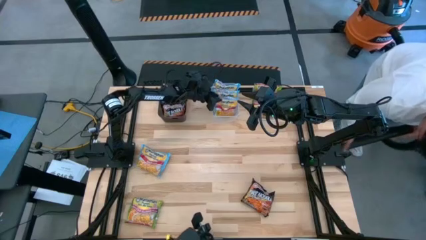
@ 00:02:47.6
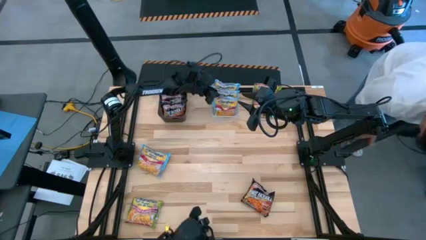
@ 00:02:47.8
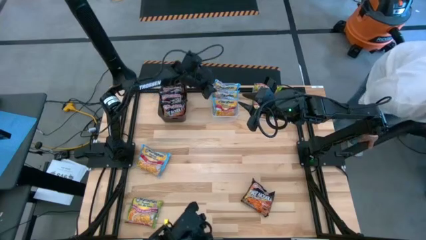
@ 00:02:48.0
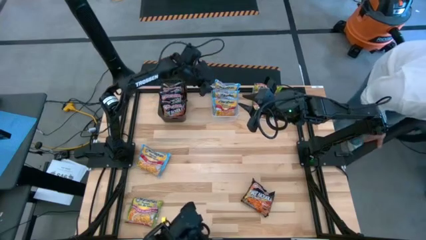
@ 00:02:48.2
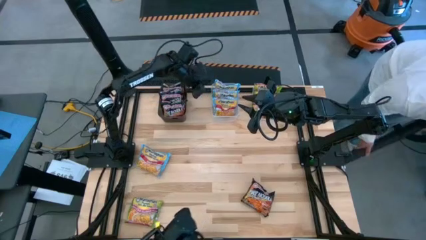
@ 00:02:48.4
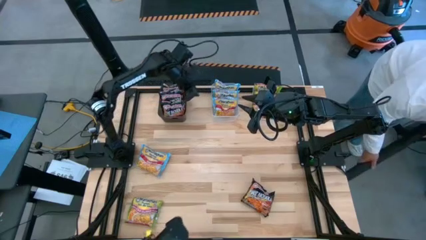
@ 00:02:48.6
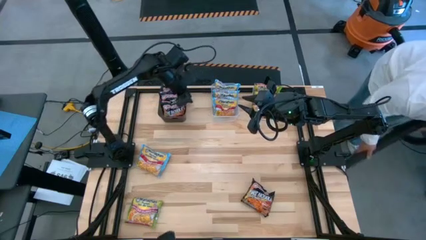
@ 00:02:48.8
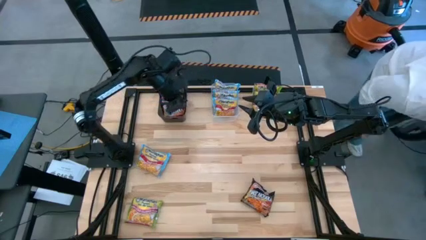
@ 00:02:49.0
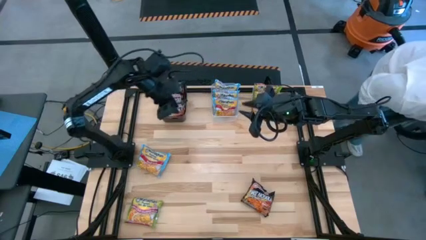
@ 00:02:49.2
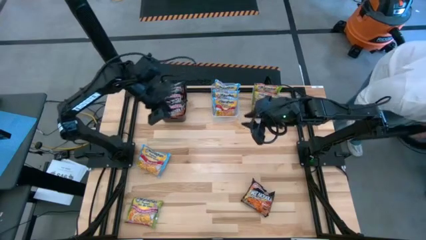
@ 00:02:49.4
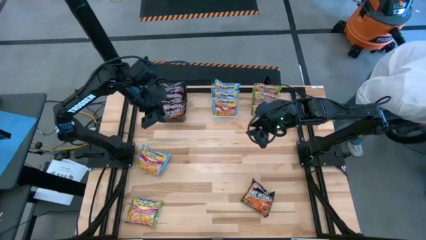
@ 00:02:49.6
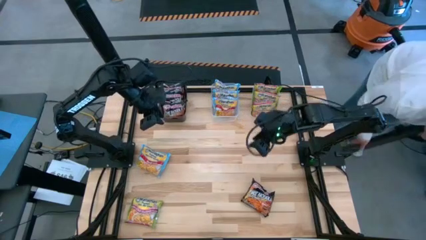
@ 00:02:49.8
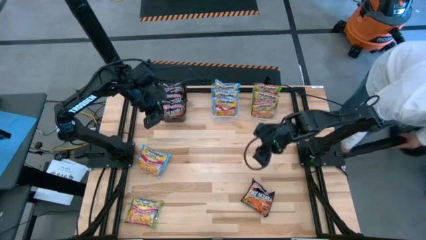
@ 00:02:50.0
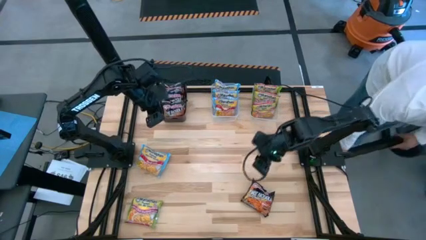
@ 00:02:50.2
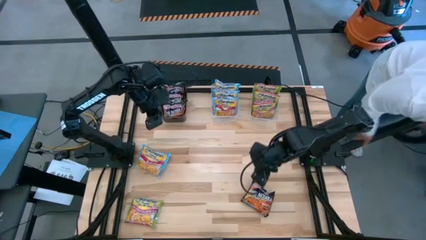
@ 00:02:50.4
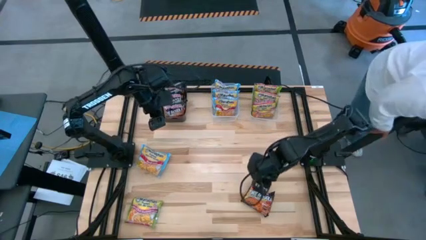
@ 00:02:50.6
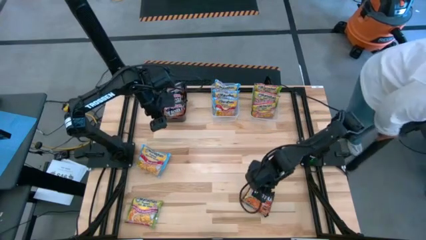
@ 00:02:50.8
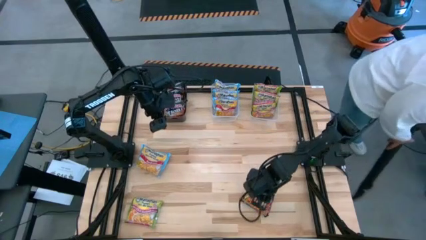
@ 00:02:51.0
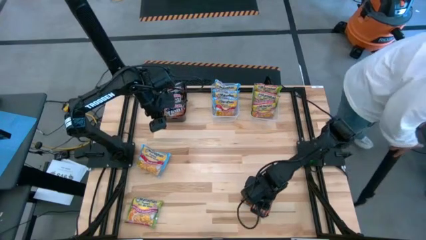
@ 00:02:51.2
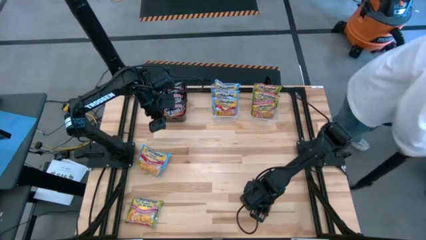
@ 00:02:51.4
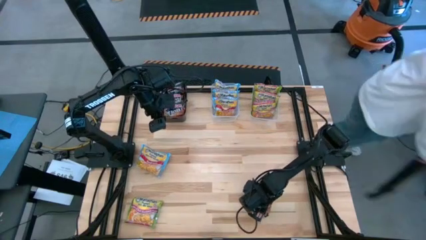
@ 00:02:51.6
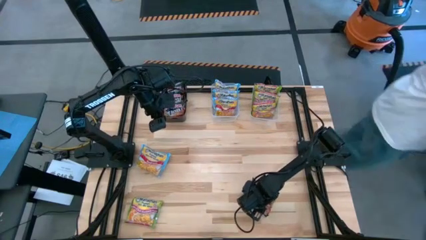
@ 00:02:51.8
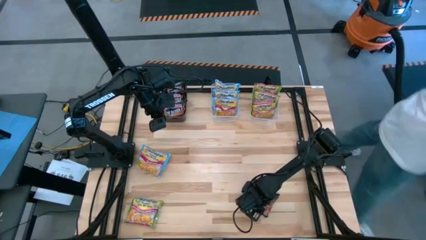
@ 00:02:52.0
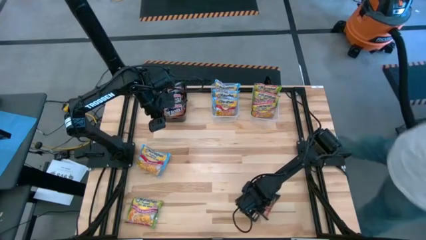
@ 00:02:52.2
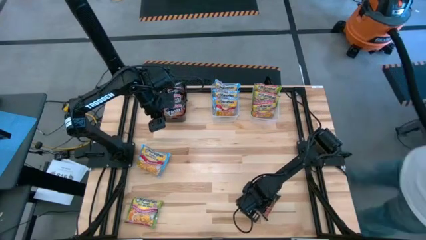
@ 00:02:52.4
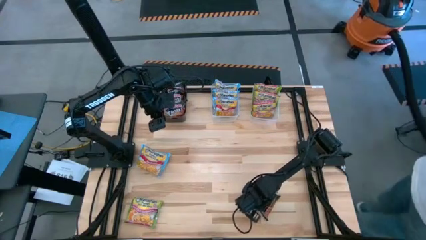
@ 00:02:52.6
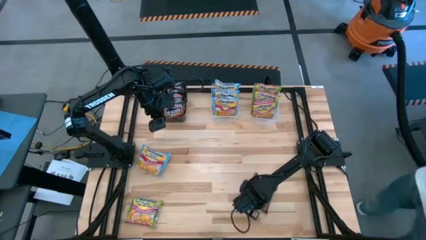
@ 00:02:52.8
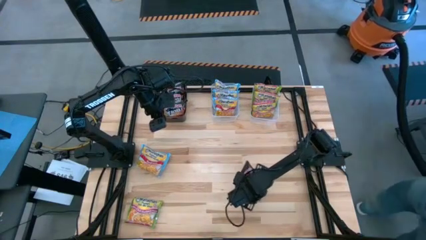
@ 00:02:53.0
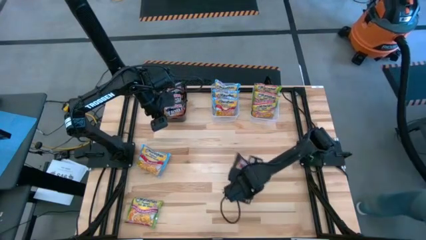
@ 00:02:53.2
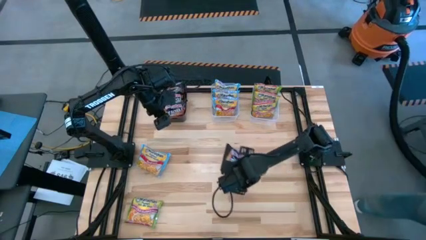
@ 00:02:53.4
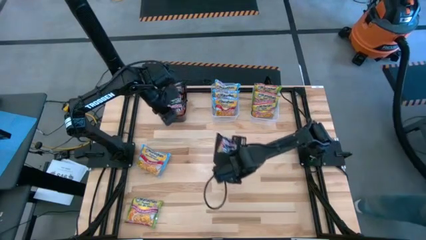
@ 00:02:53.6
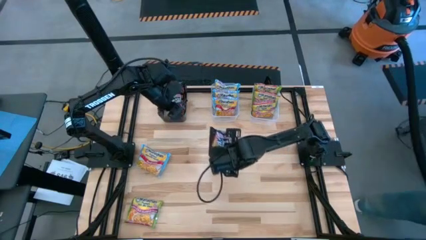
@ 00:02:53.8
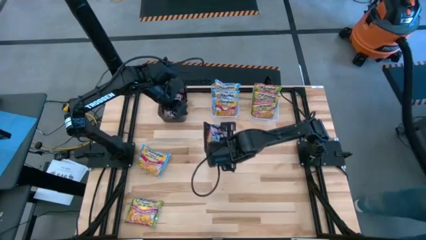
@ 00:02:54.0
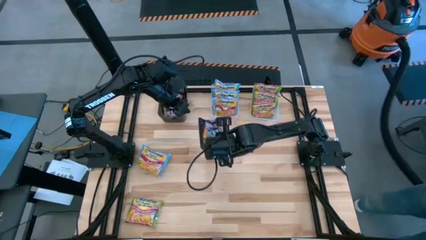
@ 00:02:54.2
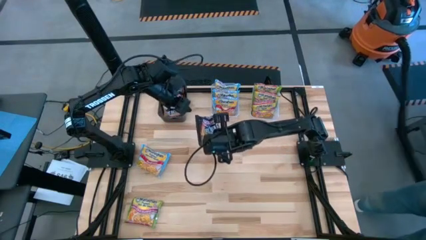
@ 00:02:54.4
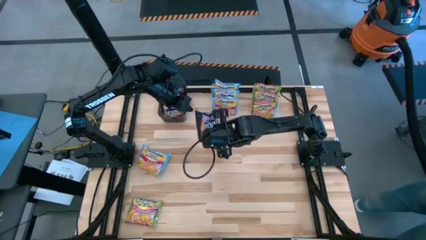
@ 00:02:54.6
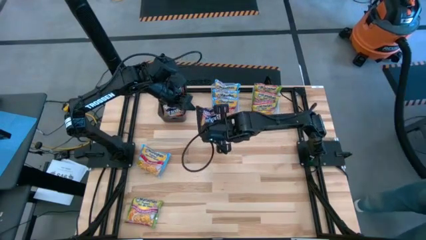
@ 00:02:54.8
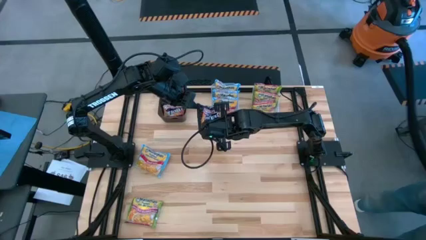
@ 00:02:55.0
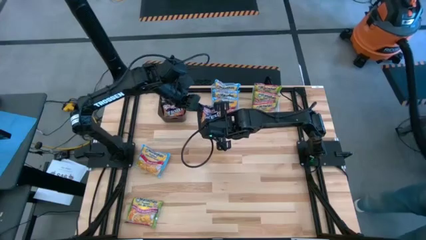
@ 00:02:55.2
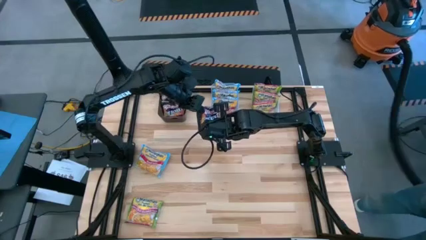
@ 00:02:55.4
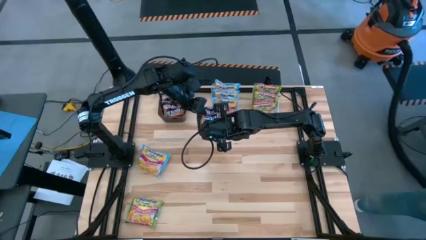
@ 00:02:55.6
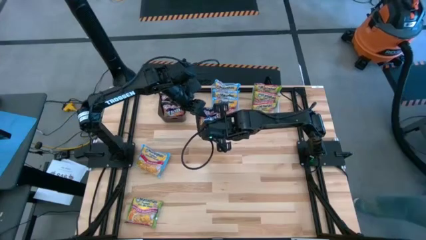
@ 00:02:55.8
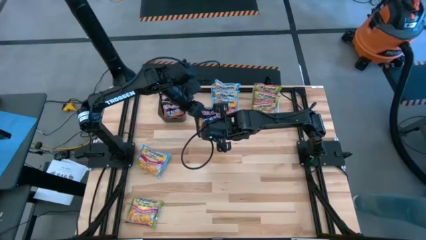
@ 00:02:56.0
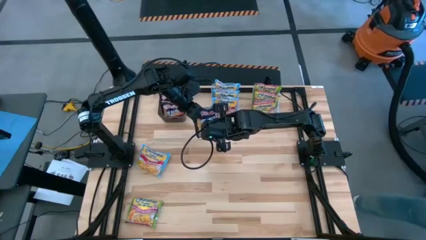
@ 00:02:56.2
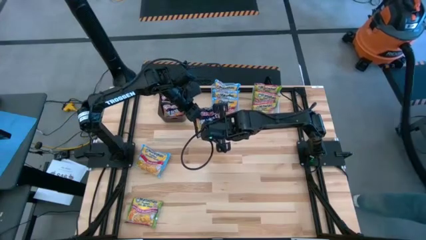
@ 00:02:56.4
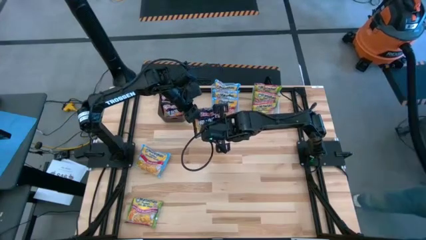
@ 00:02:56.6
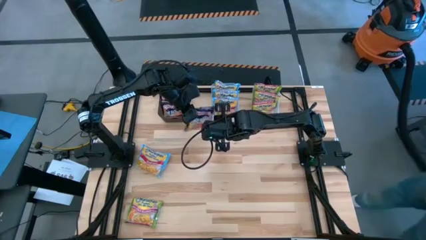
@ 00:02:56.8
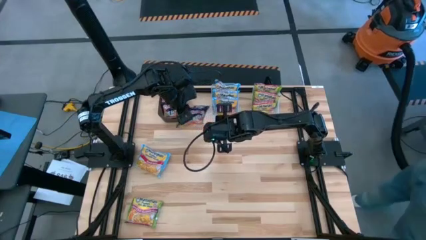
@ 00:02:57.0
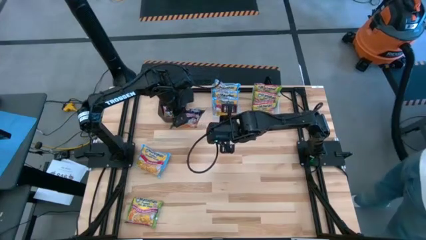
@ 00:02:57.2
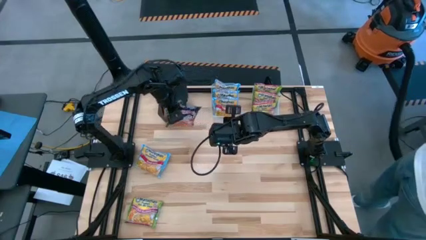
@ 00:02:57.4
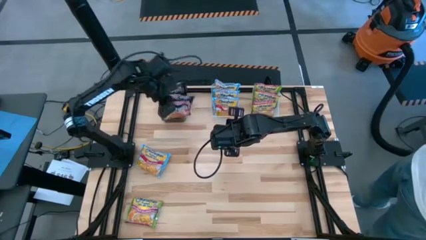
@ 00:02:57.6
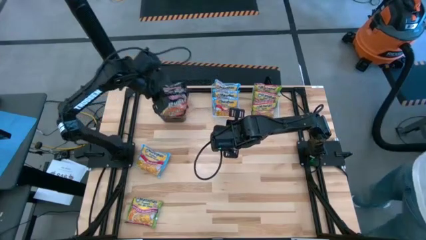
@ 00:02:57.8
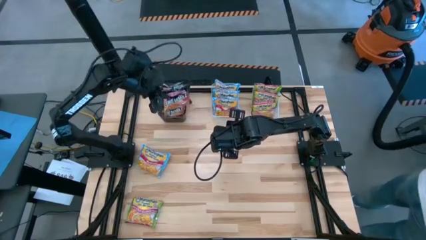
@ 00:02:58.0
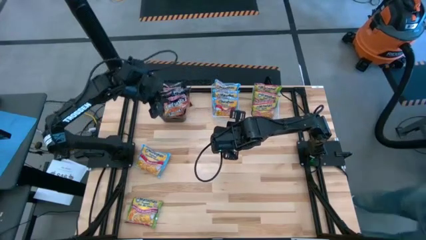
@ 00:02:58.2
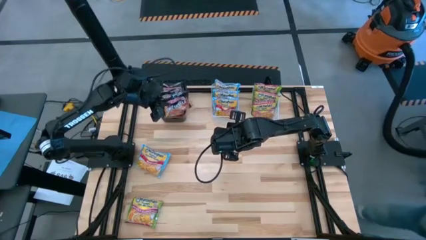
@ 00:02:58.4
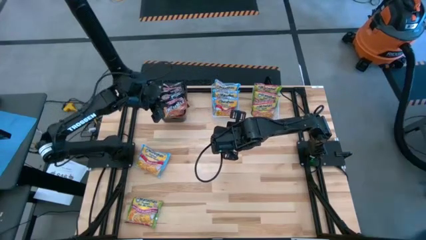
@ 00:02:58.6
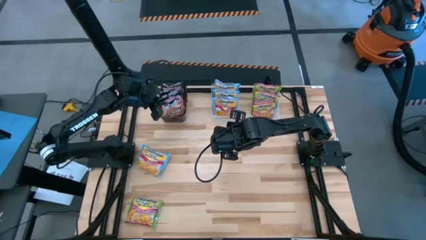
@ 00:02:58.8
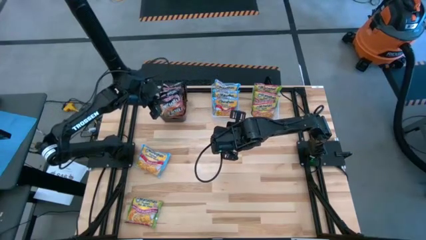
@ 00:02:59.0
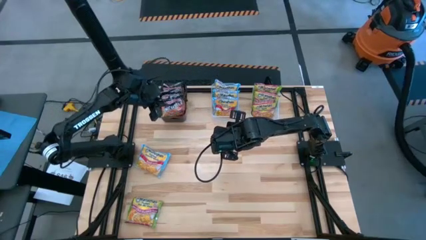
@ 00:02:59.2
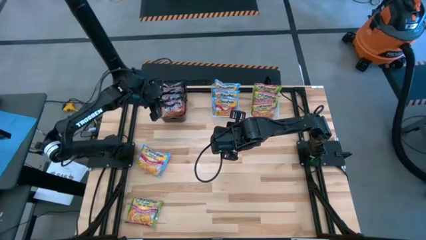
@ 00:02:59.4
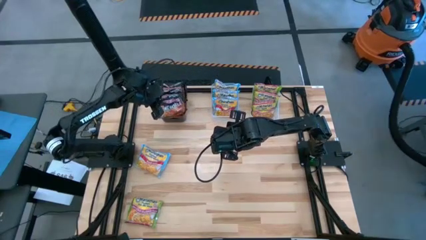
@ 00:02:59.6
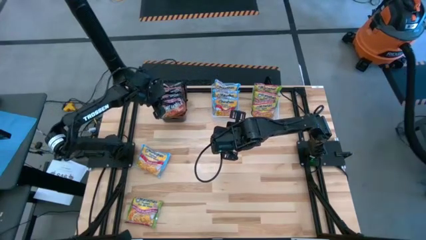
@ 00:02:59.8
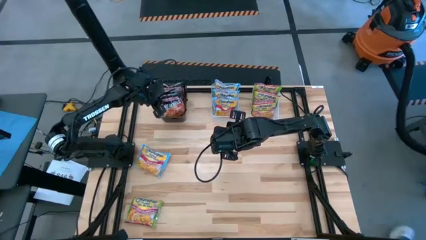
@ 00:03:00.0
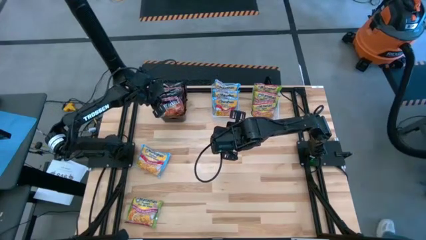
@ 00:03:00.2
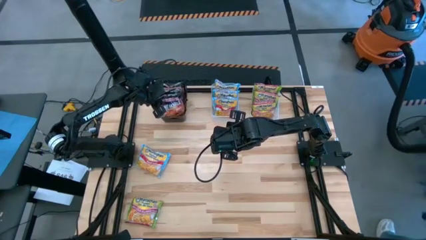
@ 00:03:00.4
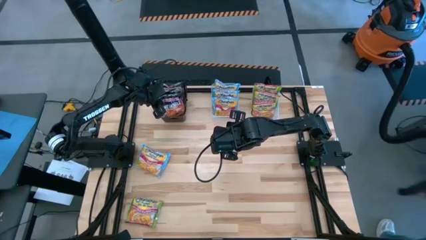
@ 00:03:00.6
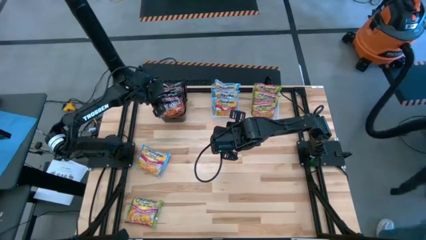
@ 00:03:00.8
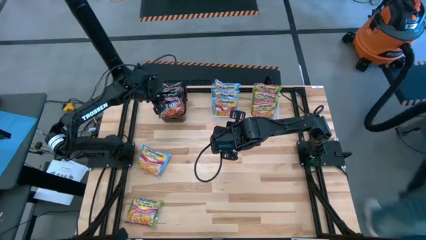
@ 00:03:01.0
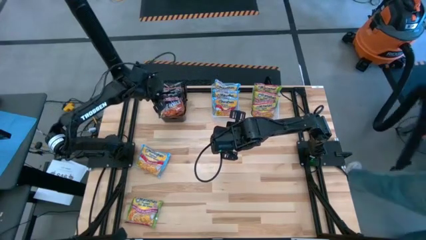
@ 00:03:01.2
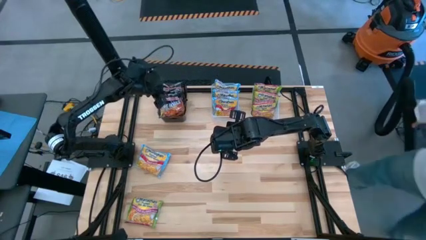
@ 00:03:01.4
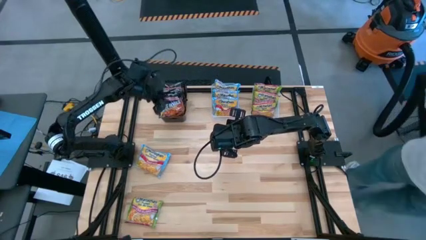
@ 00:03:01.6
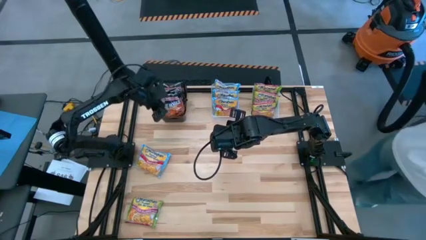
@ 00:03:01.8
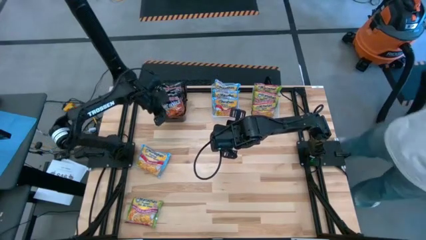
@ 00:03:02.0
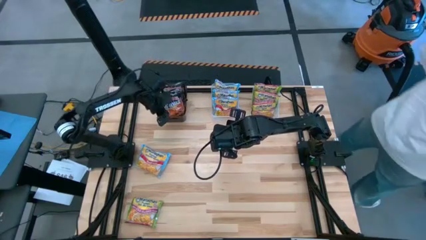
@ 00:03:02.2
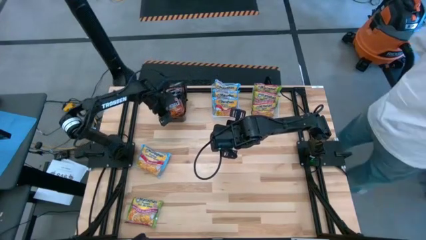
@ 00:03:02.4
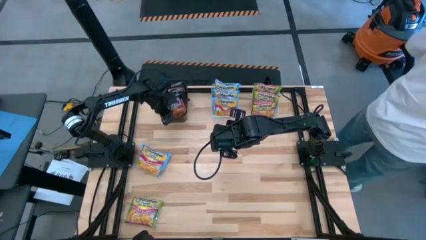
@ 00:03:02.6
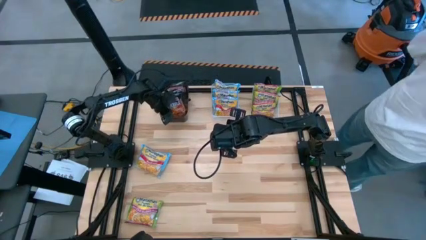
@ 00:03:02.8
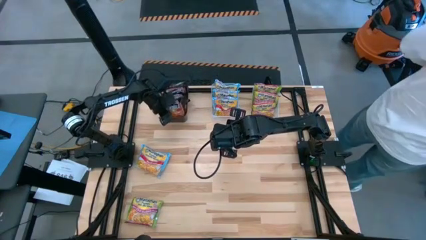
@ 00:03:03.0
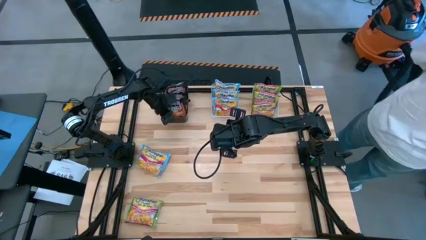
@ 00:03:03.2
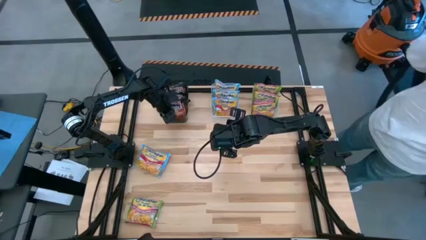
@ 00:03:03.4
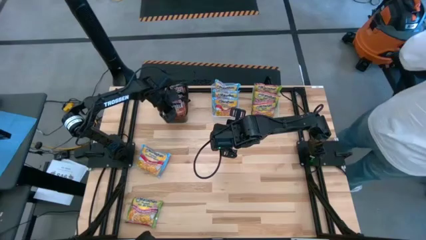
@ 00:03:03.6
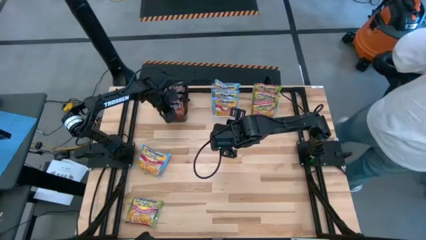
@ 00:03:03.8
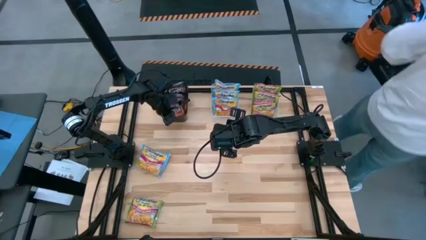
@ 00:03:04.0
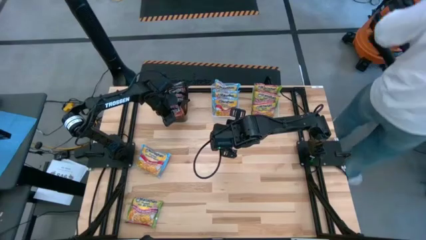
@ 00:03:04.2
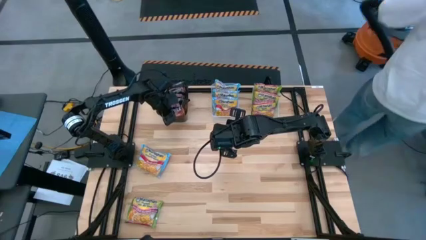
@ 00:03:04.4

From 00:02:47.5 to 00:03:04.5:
Task: Sort Maruchan noodles
Put the black noodle pack into the black bin
